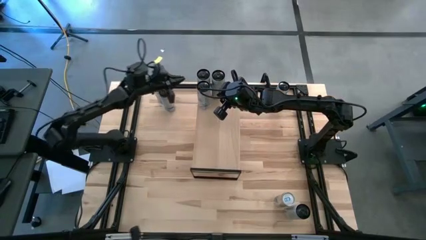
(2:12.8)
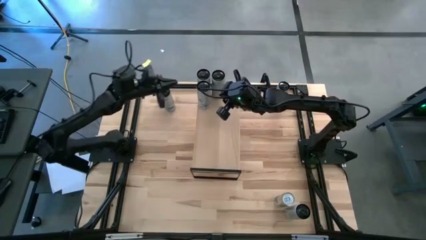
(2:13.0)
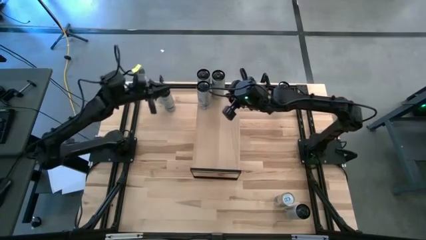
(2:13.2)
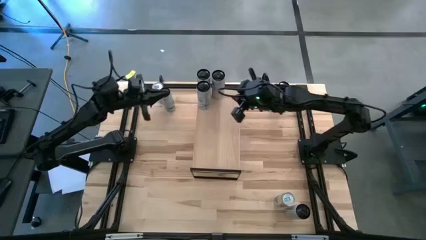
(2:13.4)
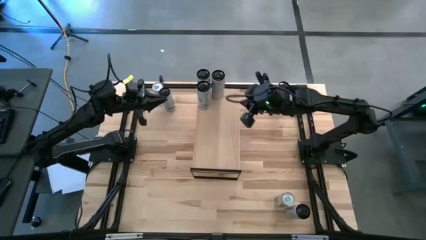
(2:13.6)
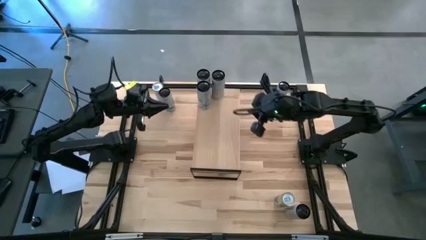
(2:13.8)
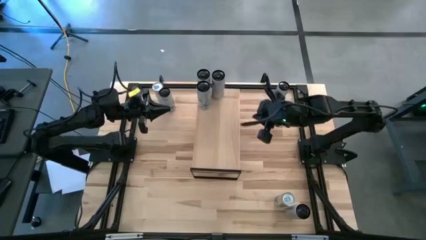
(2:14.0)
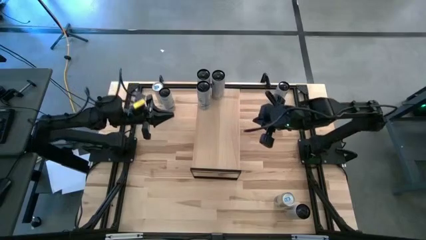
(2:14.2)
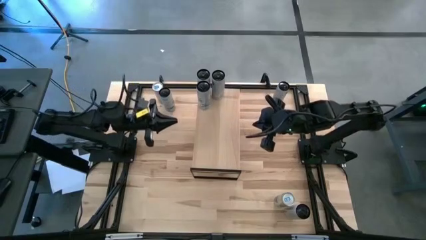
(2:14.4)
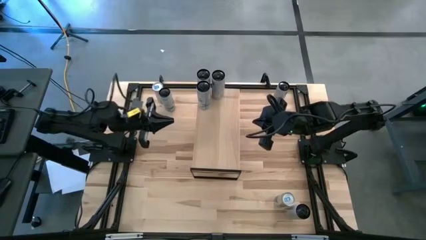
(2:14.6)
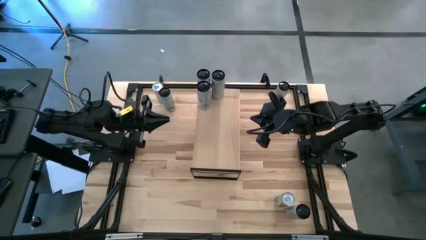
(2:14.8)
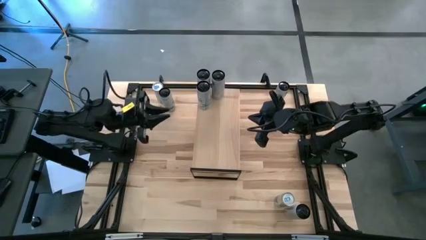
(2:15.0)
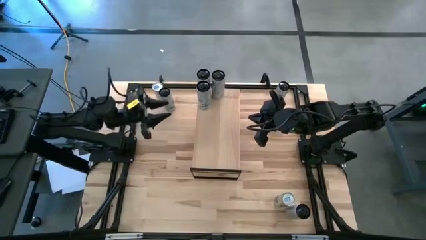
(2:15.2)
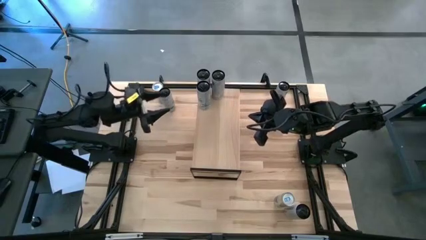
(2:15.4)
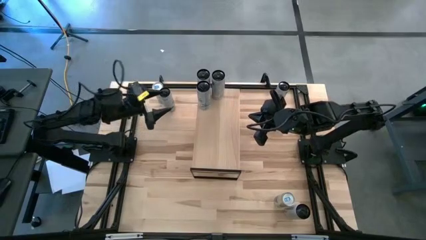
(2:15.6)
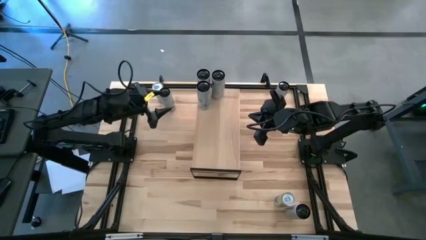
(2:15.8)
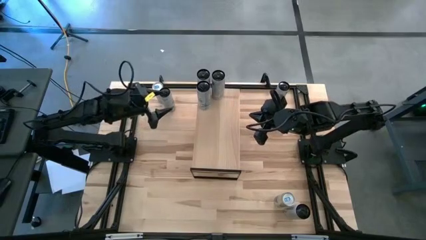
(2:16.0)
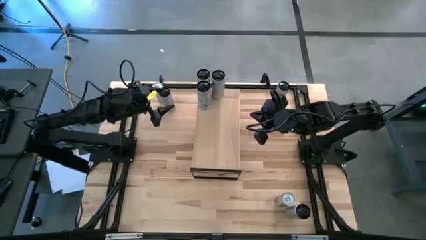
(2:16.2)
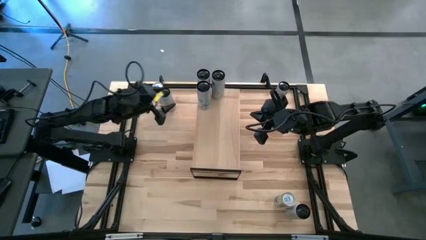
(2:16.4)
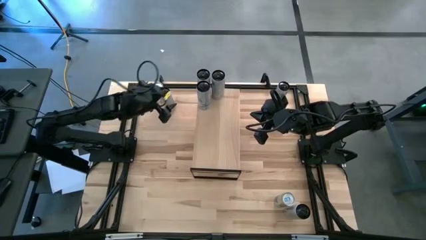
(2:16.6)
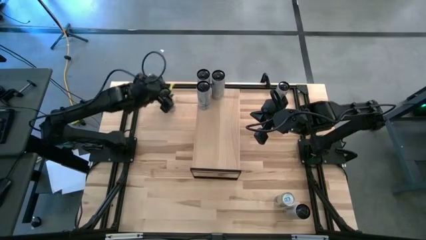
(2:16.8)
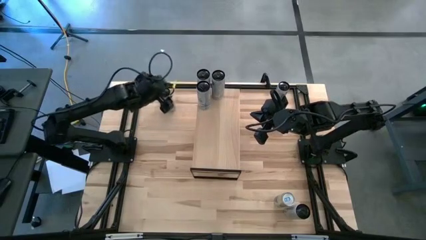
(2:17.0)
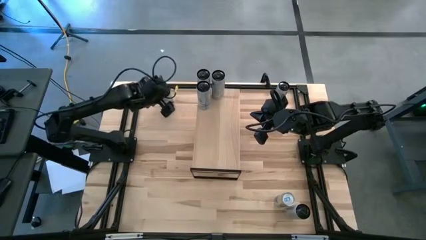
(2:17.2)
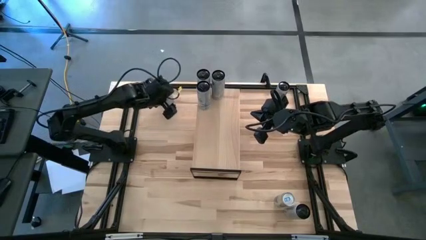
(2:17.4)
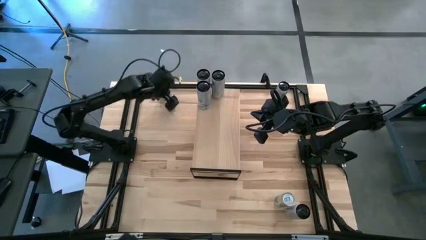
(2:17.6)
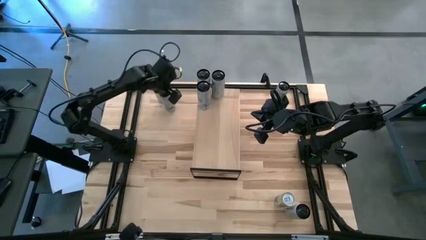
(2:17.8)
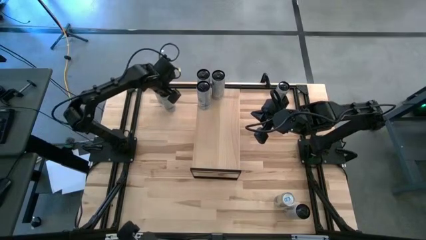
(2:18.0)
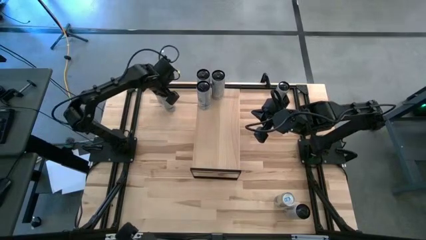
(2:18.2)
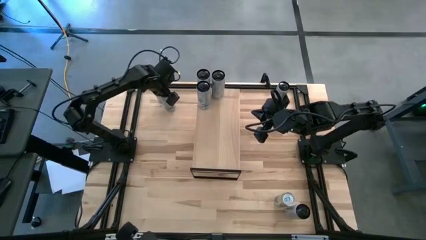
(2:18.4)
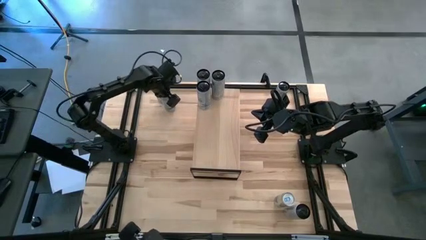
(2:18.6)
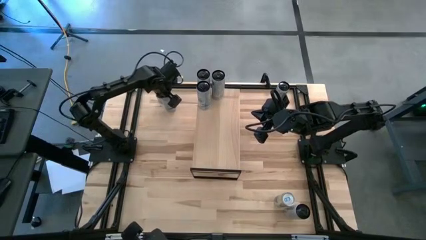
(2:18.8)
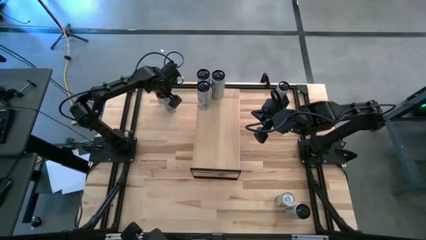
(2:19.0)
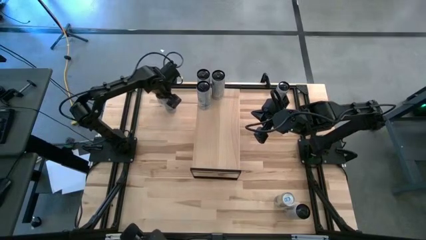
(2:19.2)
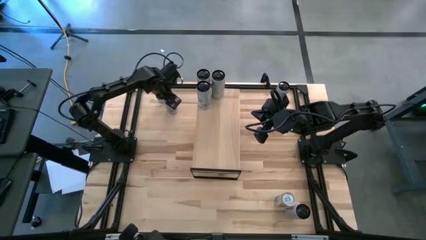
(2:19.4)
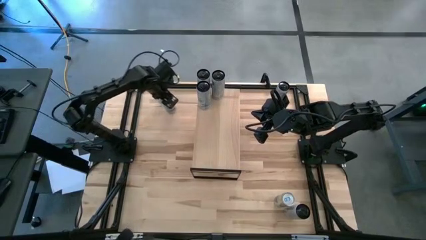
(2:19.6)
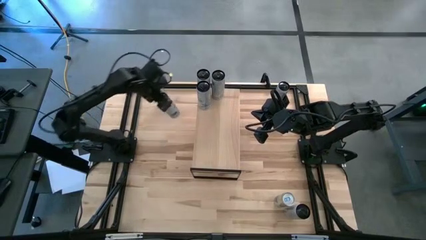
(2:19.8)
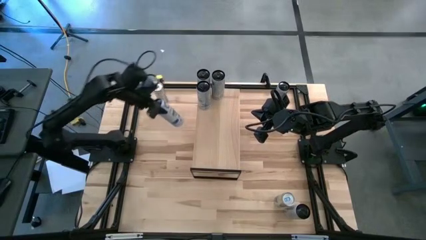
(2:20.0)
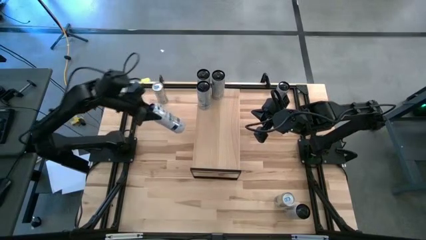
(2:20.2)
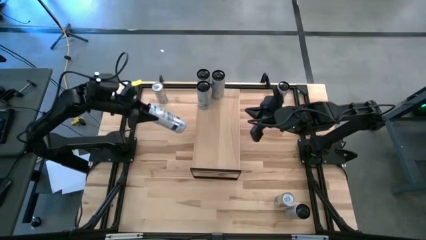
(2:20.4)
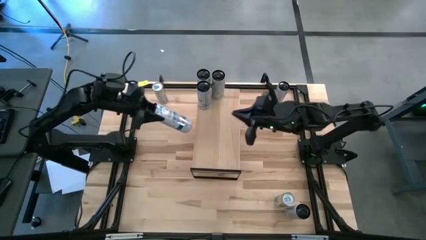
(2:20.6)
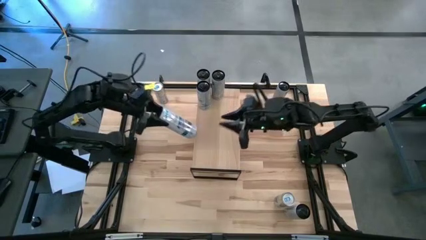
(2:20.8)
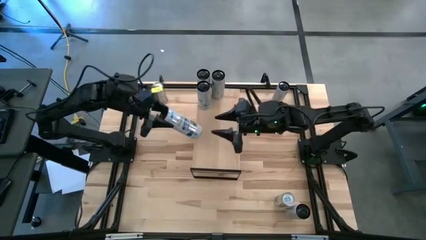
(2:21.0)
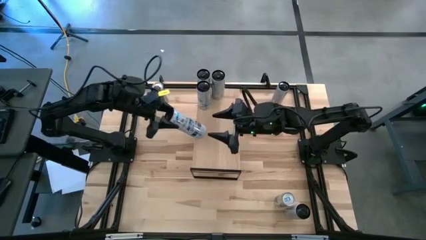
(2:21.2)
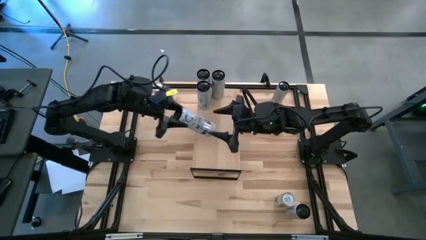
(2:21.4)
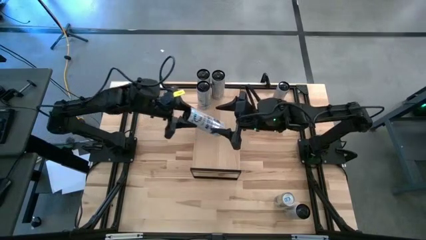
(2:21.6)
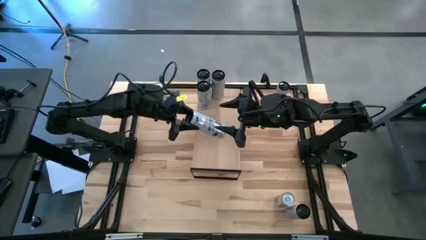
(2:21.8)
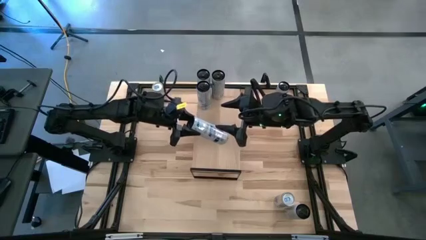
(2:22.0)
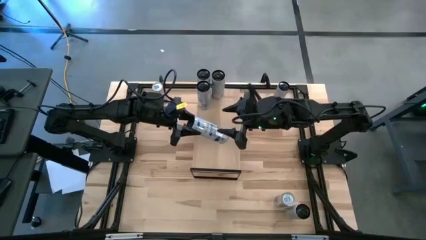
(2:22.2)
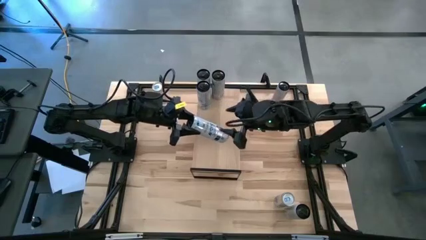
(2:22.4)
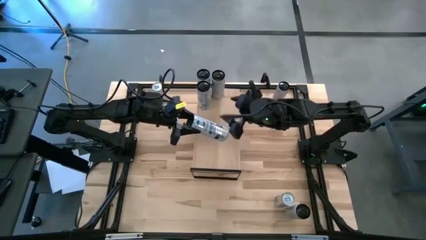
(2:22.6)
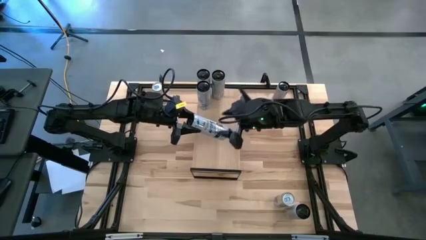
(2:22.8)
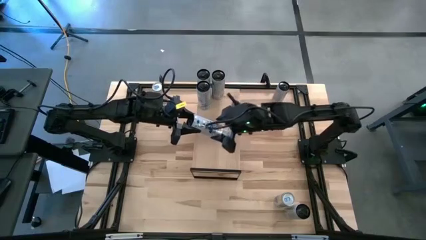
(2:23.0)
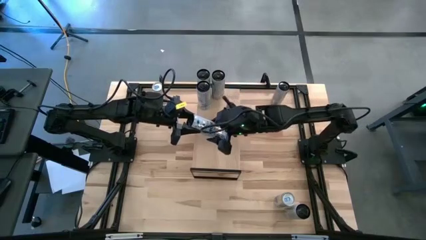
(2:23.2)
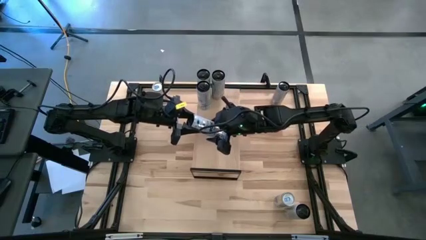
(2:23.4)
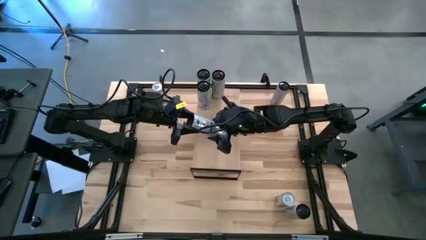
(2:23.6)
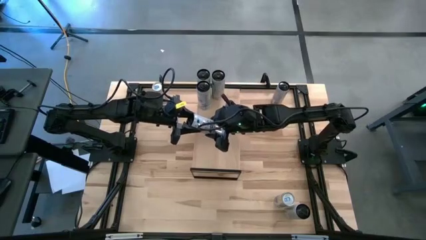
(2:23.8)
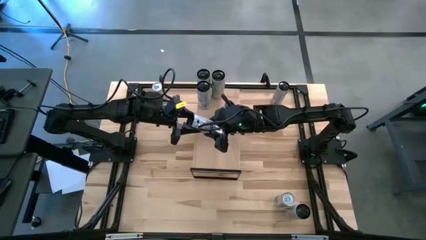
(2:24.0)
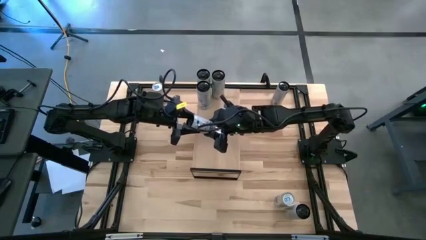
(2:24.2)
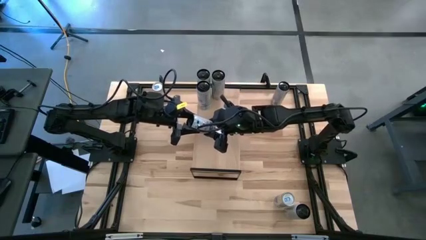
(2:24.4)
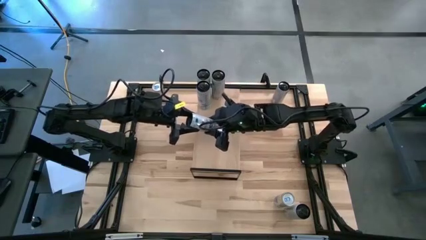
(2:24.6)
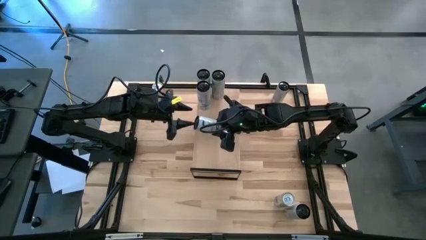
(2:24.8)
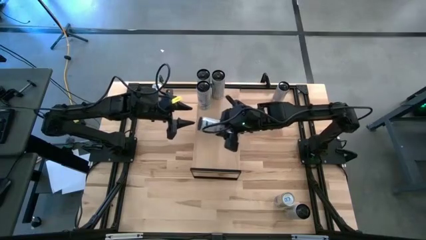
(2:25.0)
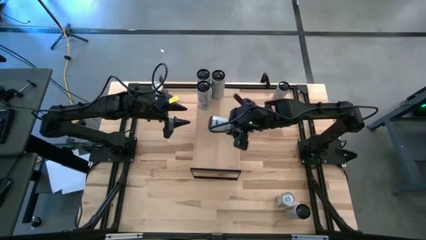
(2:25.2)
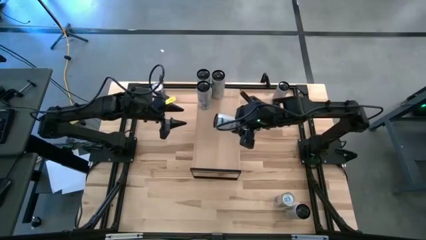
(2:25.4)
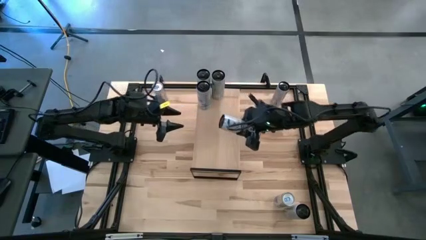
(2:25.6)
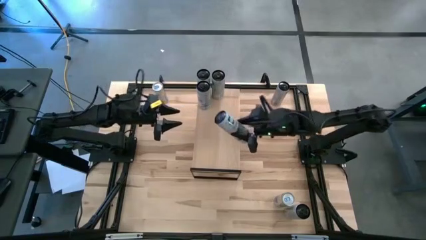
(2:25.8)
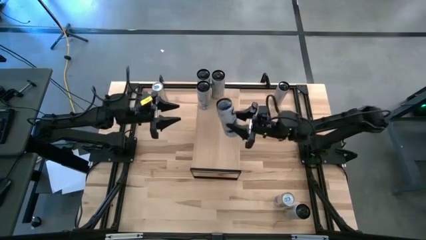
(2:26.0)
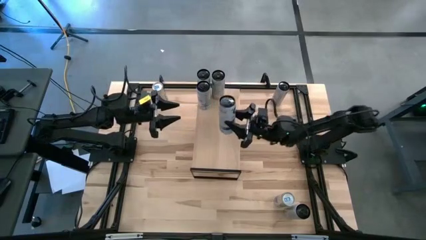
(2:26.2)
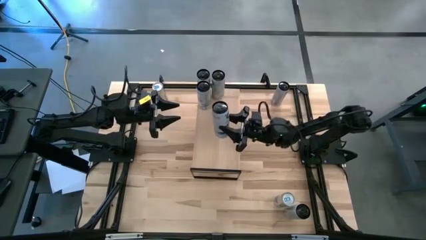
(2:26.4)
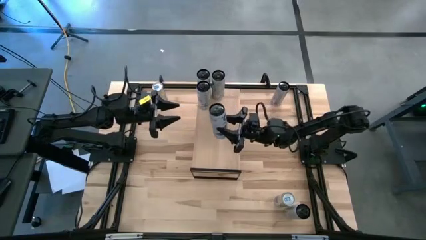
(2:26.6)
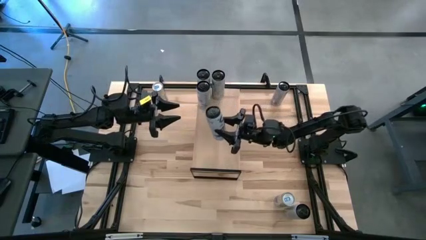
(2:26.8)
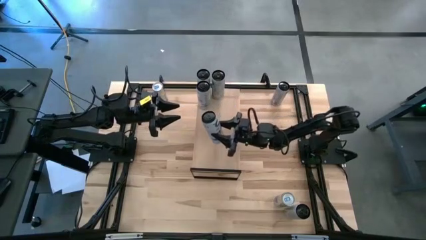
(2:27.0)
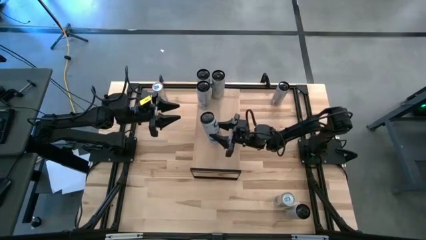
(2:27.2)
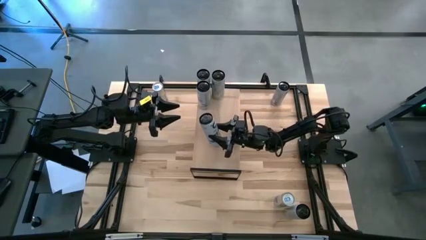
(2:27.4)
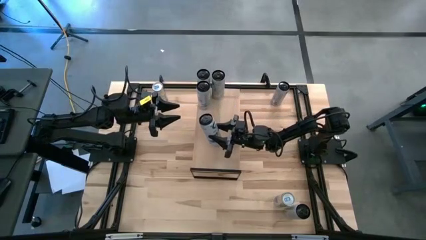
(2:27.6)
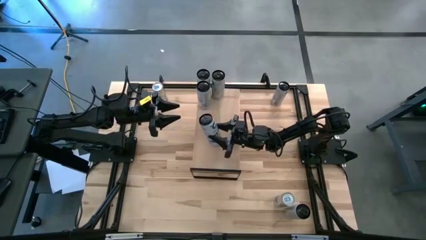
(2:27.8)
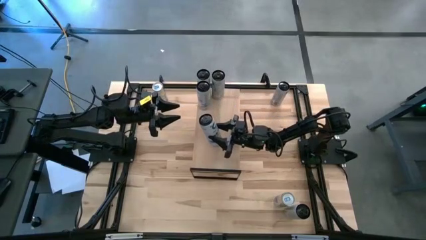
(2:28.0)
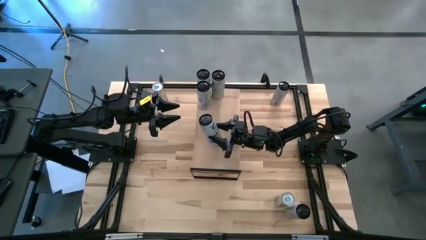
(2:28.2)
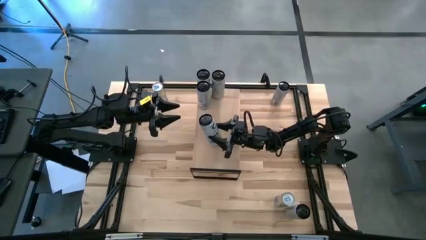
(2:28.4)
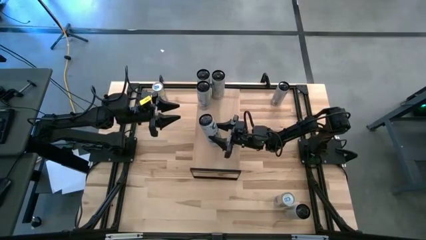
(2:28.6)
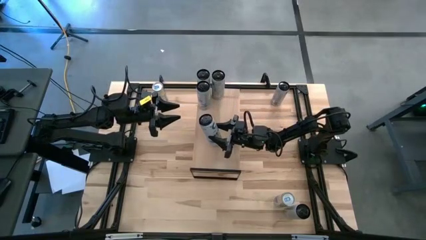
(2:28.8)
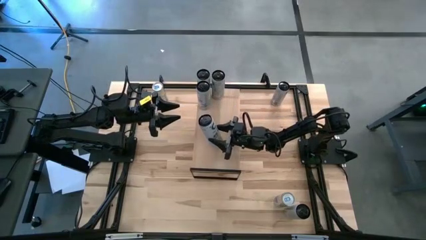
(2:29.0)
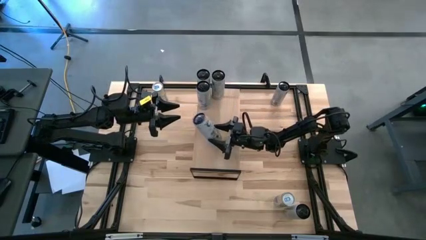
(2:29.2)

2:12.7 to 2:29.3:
Task: Place canned beverage on shelf
Put the white blue soda can on the shelf aligned with the white blue soda can
